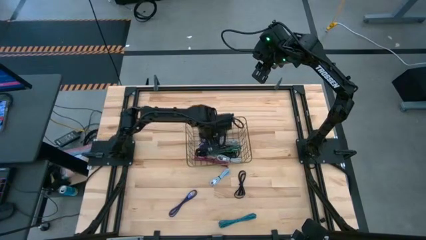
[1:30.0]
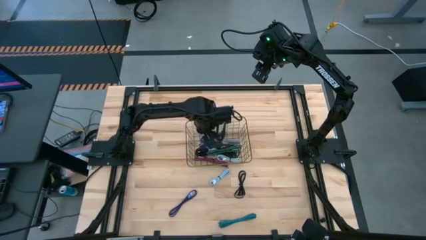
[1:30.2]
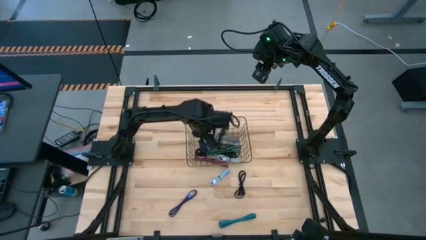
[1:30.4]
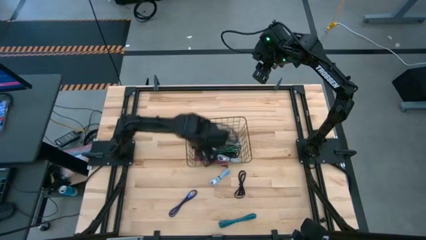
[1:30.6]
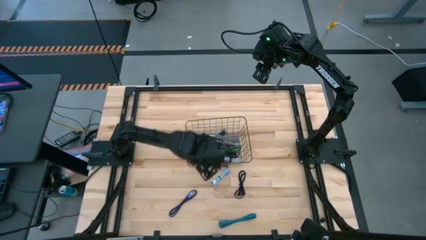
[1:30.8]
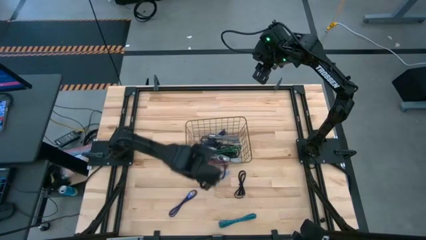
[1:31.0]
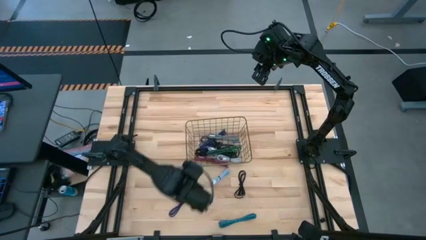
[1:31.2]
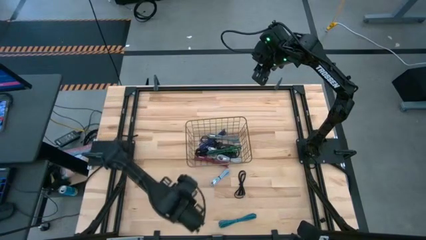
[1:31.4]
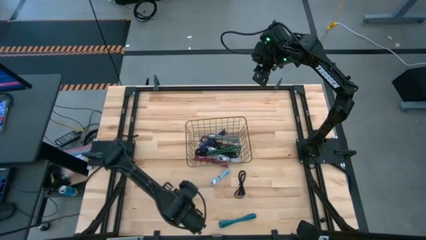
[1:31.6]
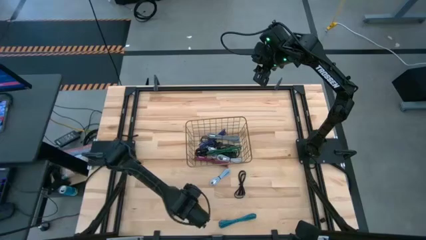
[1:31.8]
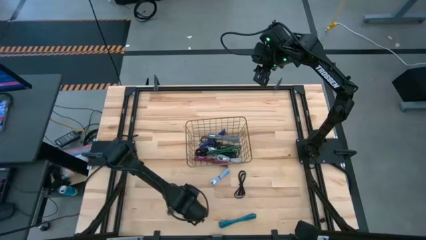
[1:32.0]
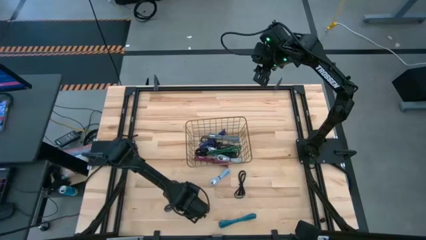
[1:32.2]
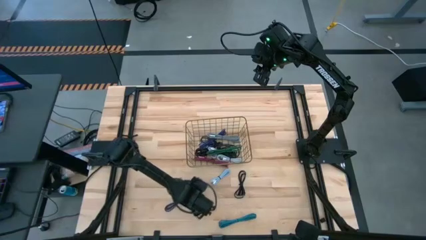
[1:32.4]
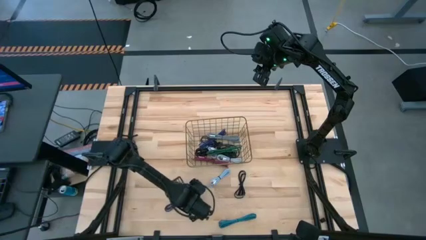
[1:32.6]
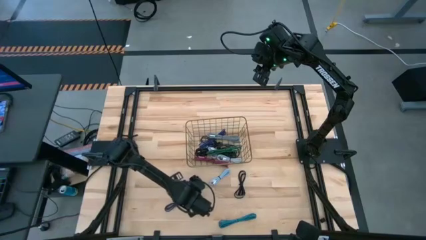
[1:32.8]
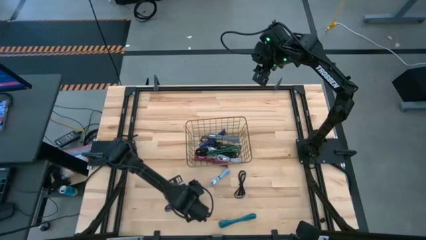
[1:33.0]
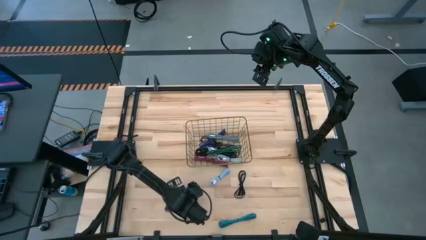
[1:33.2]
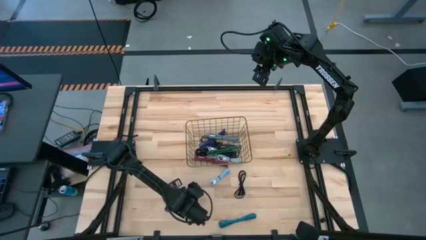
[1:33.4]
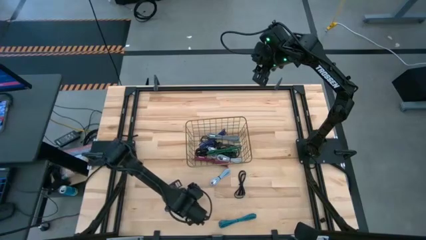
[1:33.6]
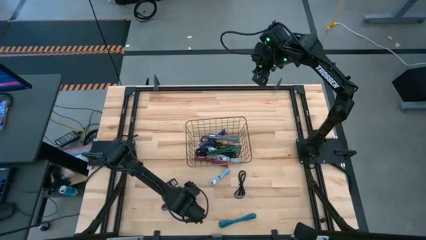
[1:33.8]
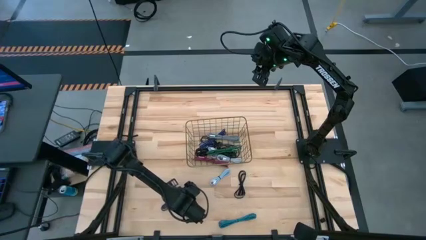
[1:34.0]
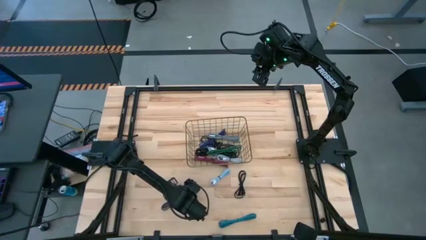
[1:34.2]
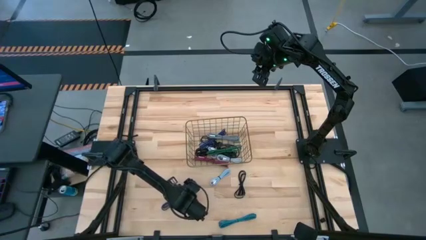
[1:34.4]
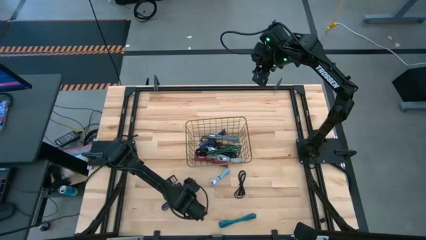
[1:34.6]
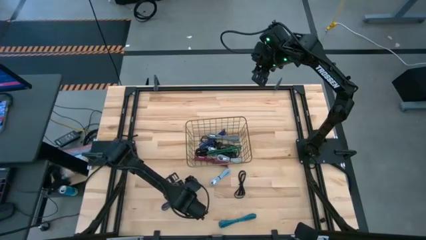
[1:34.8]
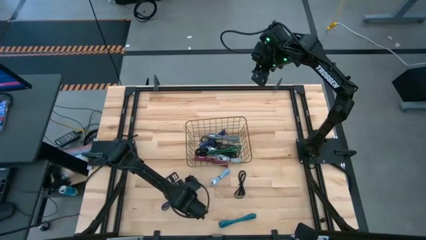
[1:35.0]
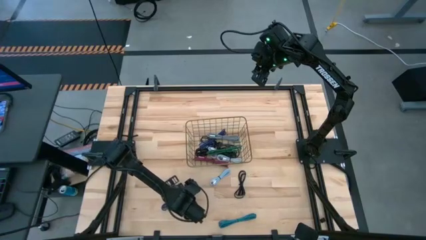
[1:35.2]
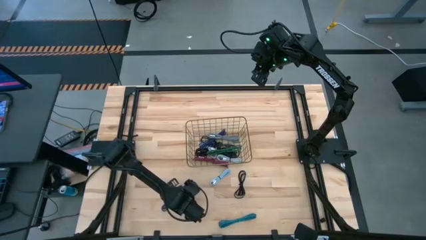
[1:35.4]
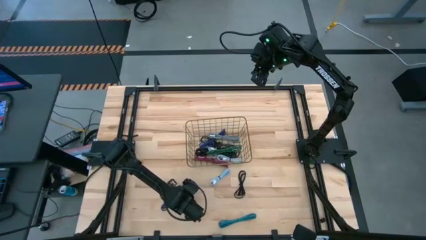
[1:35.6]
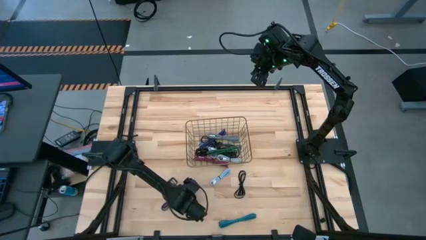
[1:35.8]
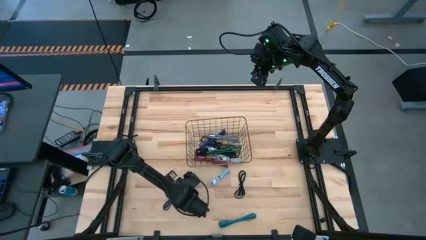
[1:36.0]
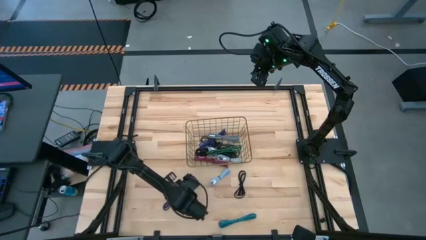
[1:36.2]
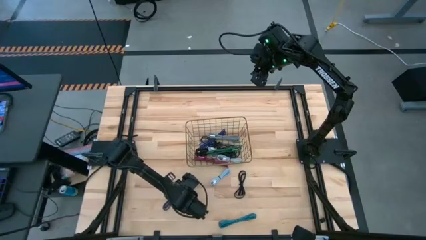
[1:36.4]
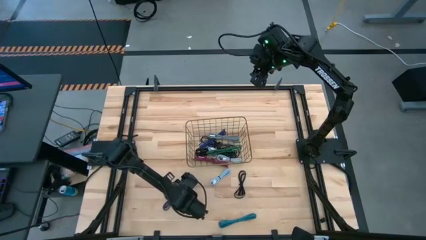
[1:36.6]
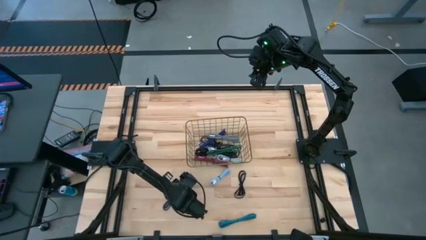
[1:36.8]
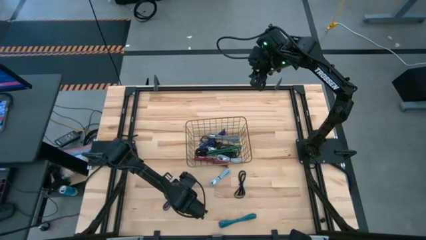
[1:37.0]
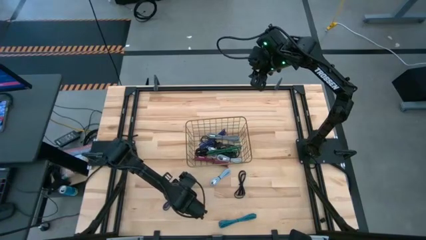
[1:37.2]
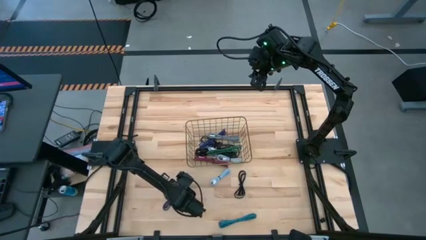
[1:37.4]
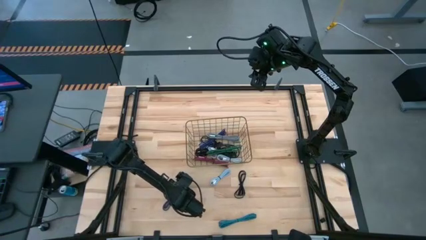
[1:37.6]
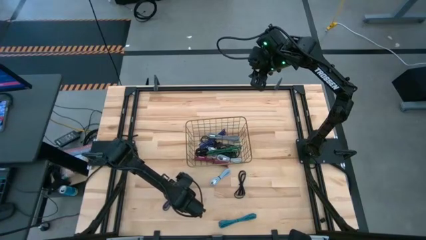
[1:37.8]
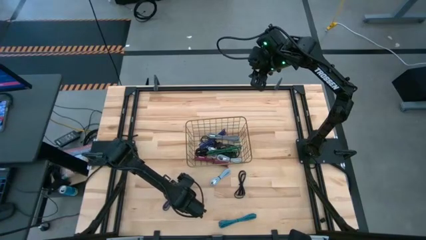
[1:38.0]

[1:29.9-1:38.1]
Task: Pick and place USB-C Cables
Put the blue patterned charger cable into the gold wire basket

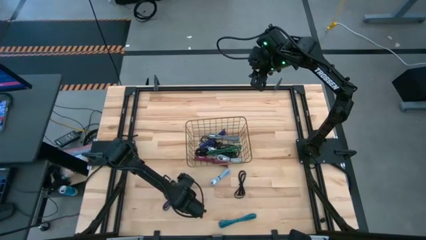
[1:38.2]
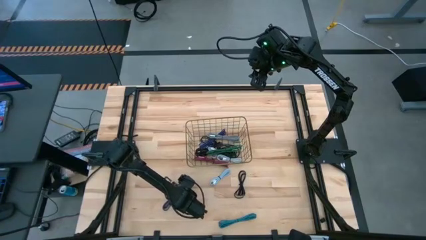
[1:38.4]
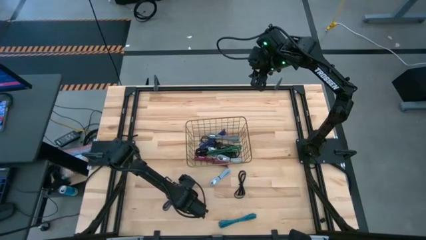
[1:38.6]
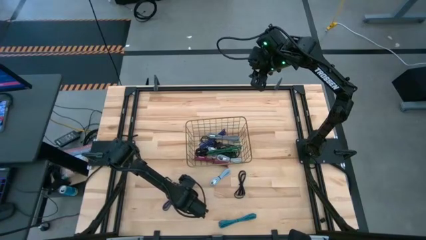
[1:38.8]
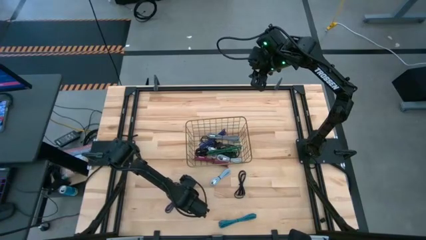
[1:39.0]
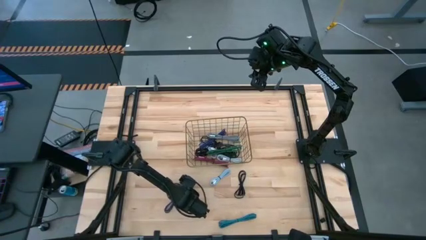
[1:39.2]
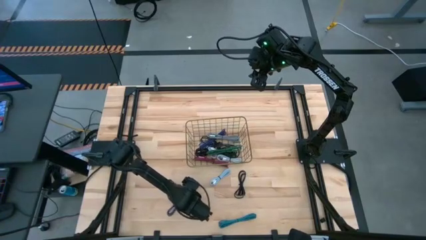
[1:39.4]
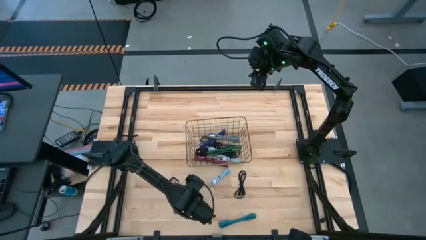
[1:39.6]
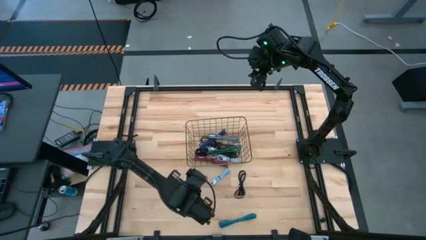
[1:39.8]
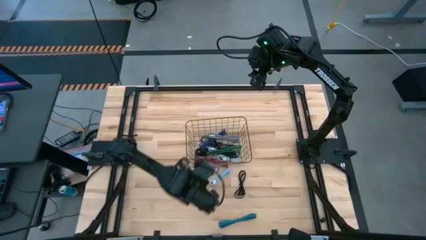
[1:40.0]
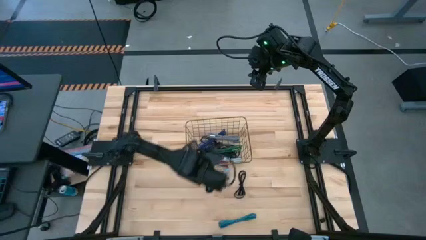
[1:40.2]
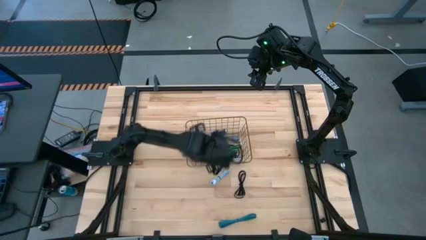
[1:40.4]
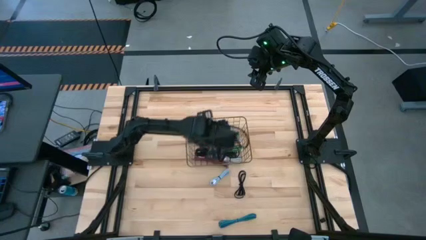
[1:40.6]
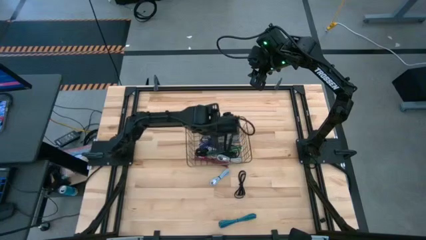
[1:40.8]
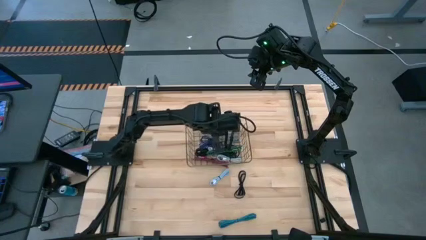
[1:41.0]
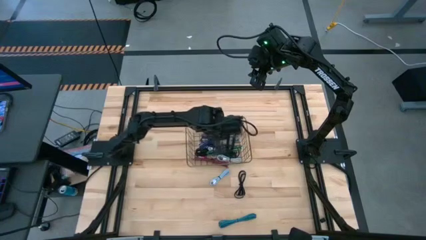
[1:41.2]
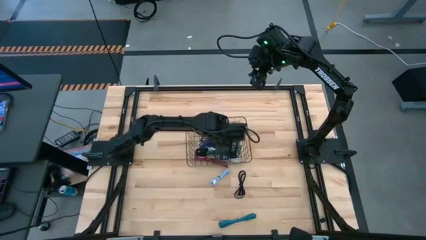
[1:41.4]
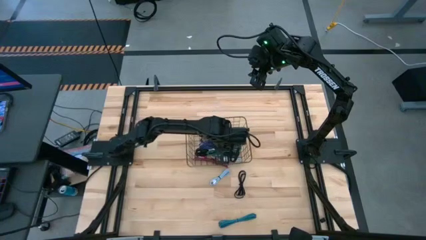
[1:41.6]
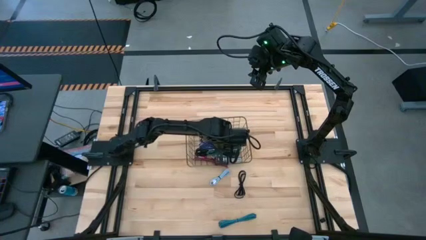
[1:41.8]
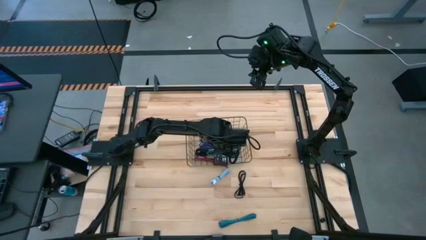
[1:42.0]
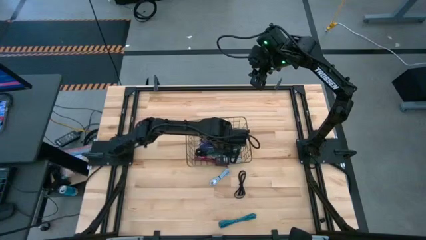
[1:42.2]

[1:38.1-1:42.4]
Put the blue patterned charger cable into the gold wire basket

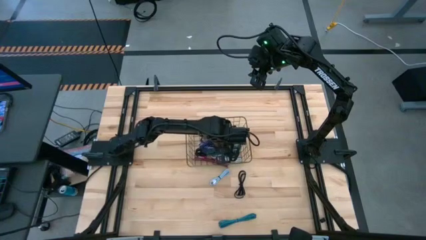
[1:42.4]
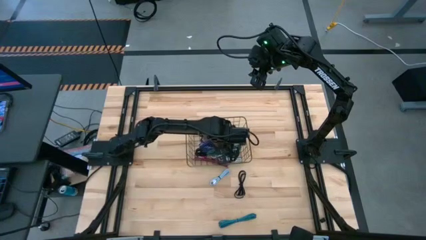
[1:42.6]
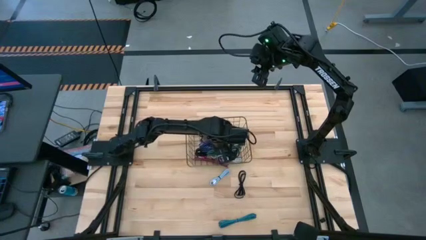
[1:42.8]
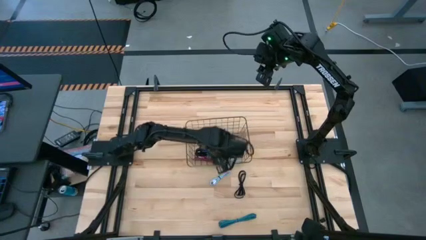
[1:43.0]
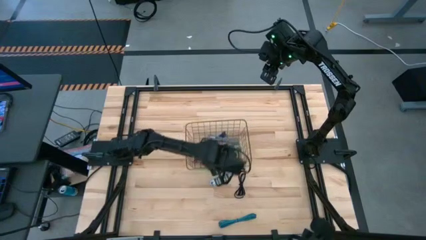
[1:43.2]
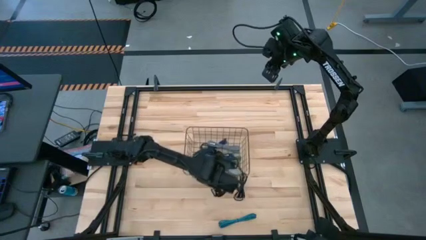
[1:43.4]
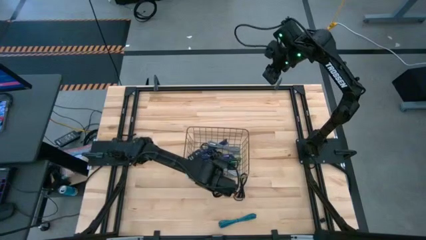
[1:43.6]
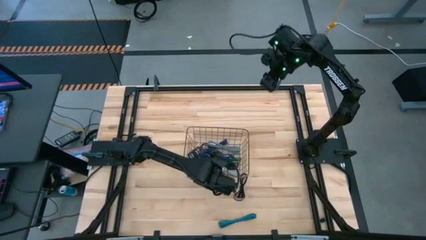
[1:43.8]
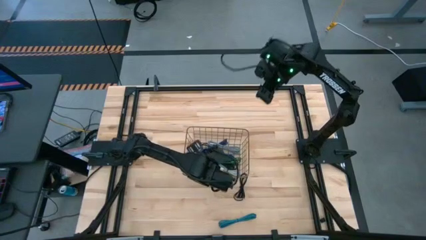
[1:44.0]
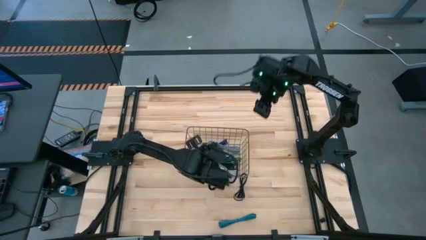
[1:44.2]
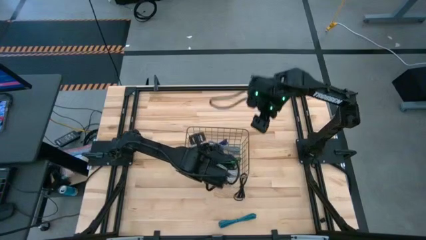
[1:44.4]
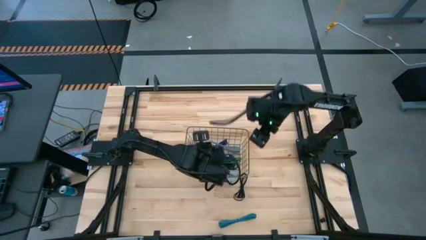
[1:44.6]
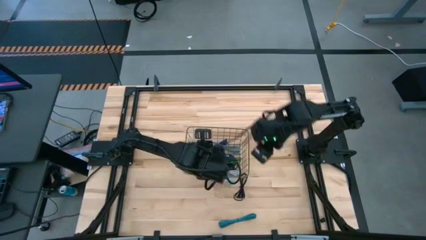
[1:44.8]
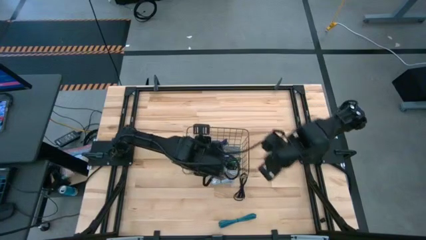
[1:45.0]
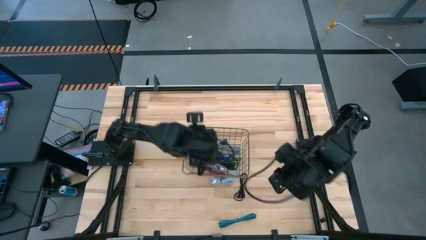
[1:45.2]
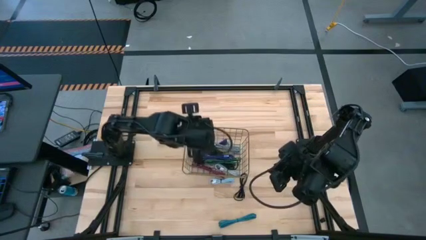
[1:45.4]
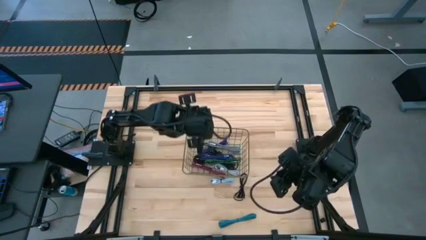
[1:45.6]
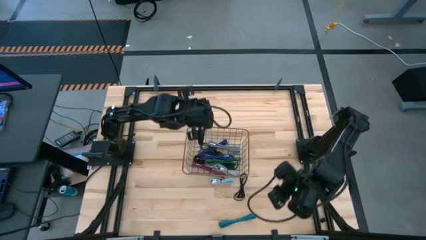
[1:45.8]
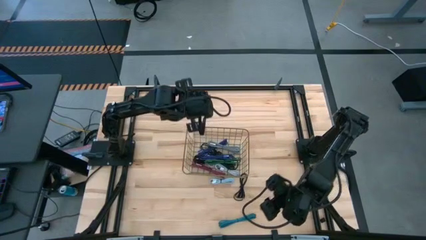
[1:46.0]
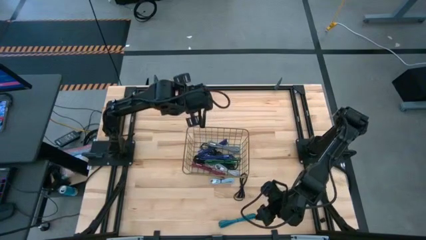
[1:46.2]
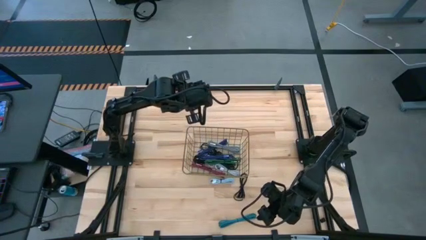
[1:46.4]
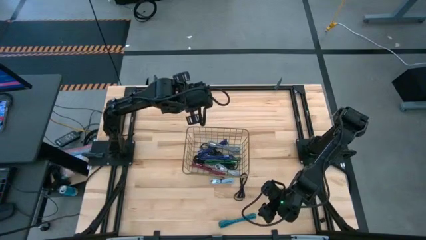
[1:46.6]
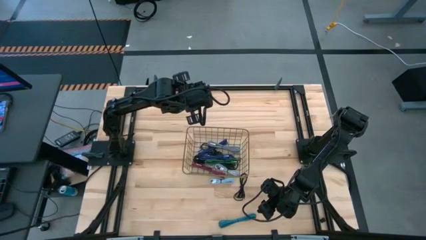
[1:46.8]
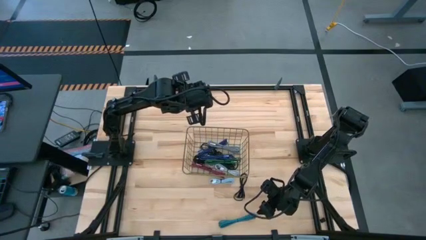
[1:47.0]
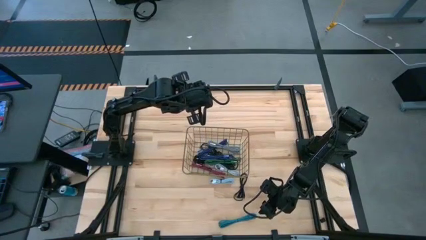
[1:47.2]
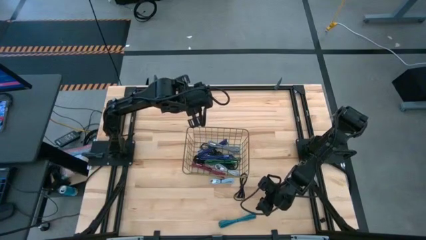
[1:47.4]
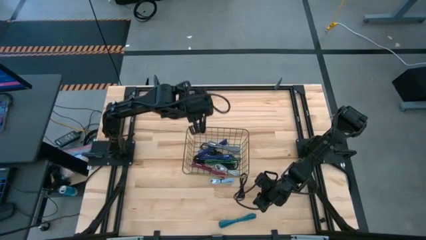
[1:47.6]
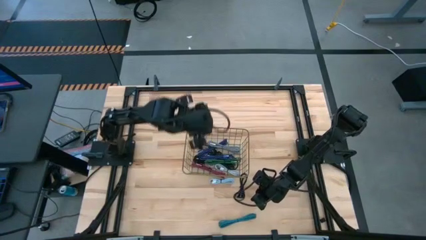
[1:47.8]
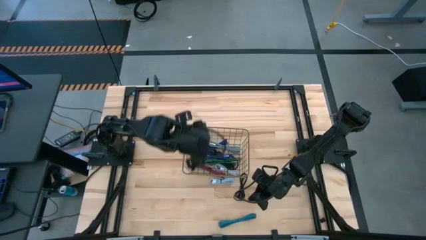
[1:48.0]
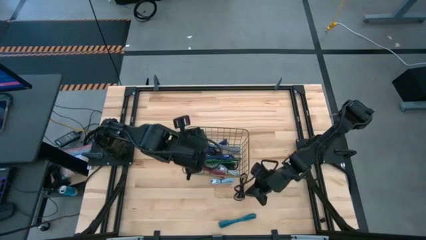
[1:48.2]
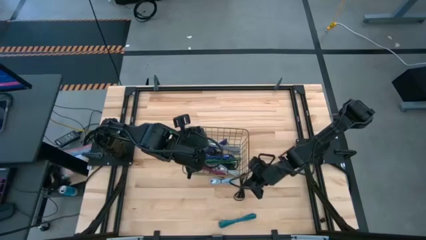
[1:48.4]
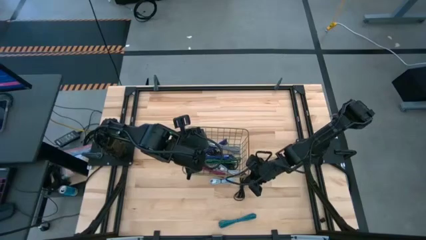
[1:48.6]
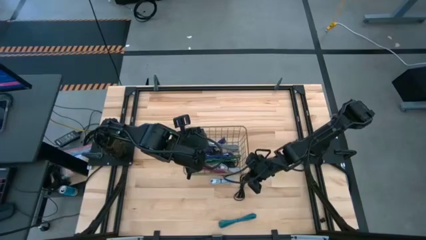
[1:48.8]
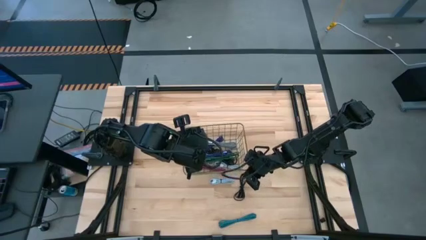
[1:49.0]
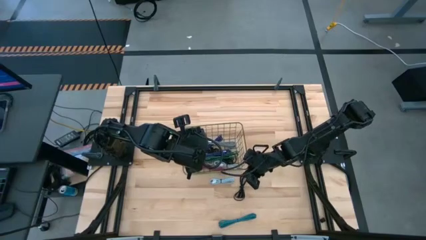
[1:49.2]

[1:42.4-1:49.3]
Adjust the gold wire basket
